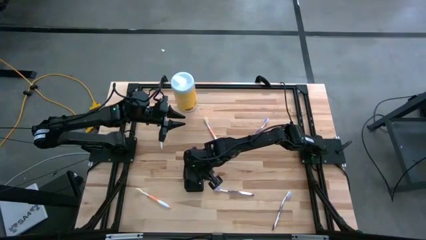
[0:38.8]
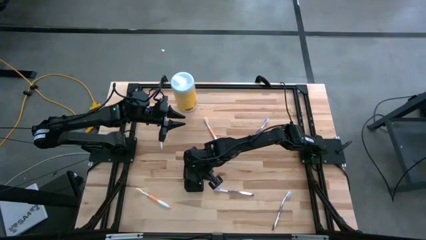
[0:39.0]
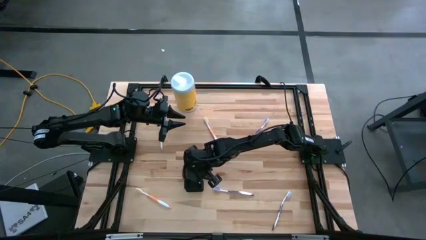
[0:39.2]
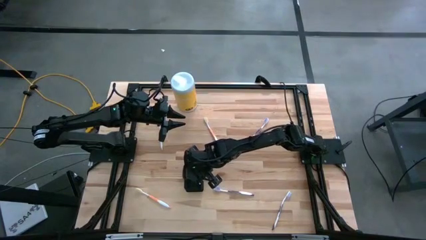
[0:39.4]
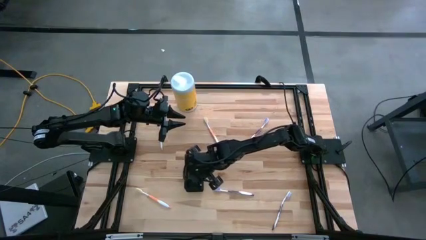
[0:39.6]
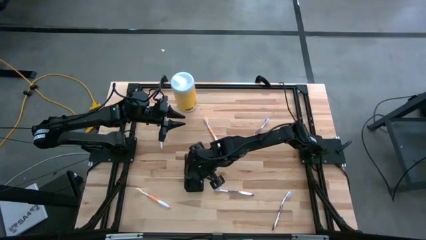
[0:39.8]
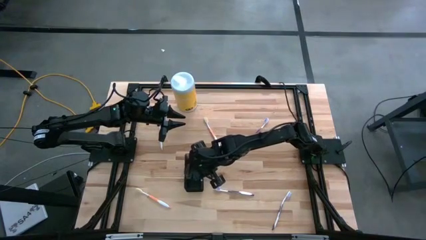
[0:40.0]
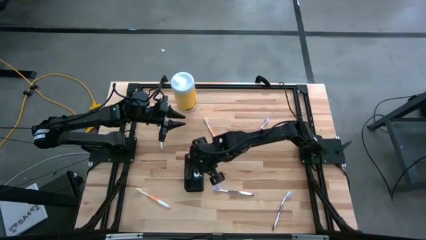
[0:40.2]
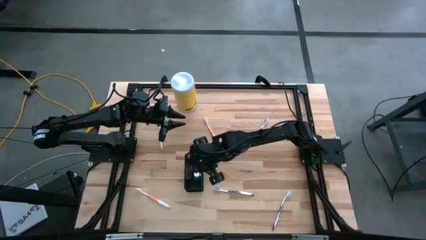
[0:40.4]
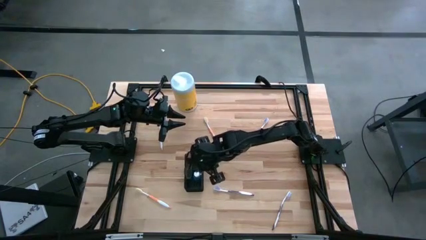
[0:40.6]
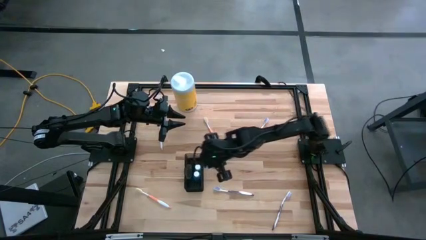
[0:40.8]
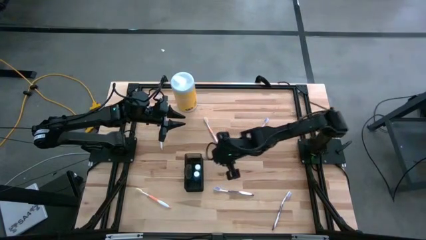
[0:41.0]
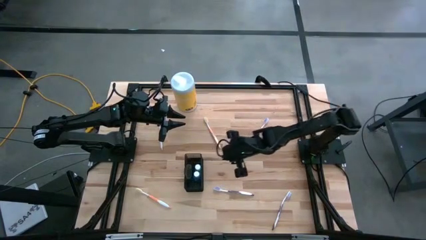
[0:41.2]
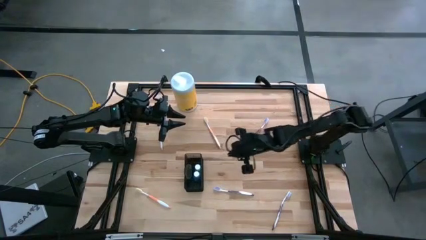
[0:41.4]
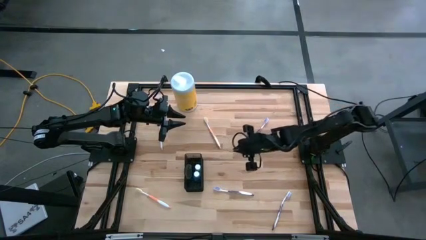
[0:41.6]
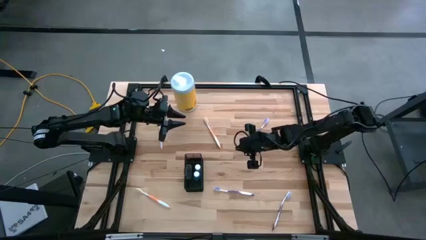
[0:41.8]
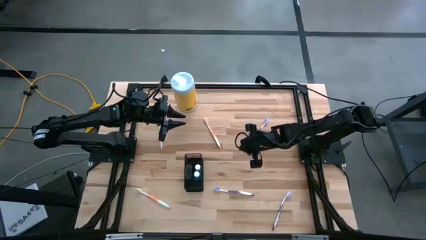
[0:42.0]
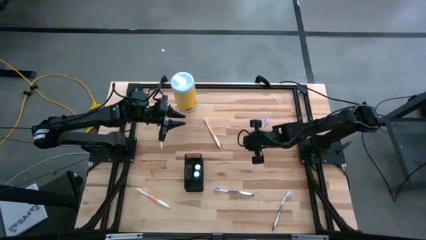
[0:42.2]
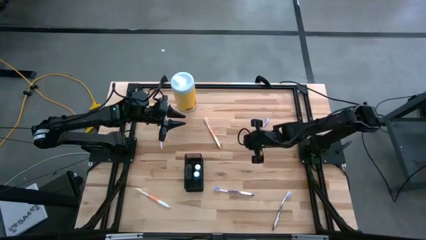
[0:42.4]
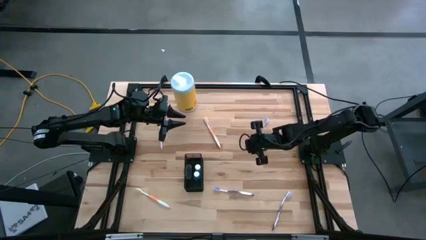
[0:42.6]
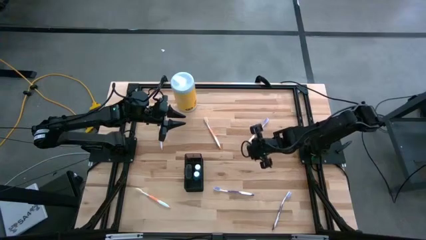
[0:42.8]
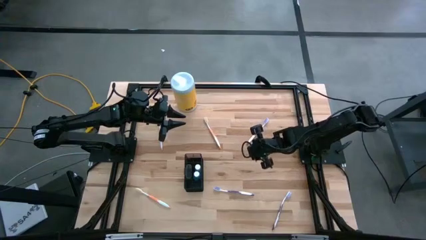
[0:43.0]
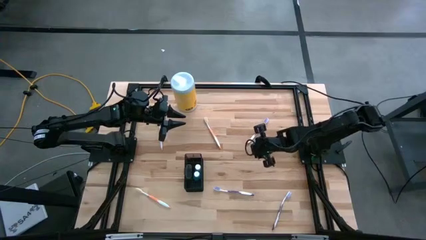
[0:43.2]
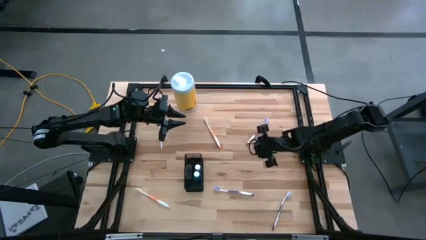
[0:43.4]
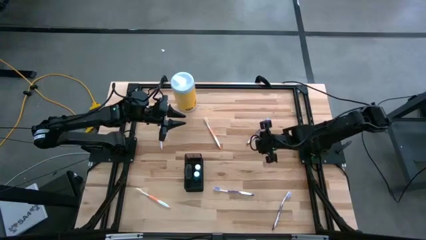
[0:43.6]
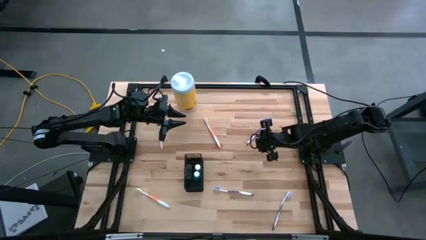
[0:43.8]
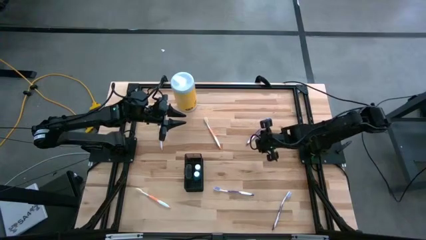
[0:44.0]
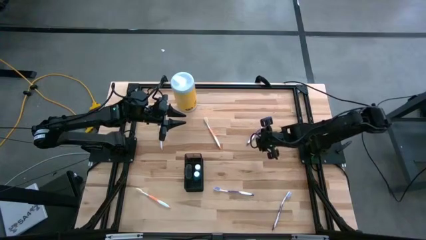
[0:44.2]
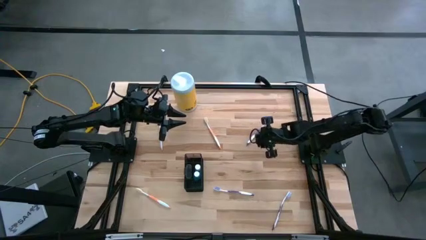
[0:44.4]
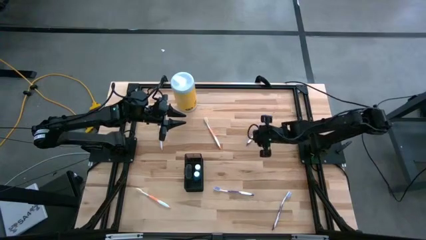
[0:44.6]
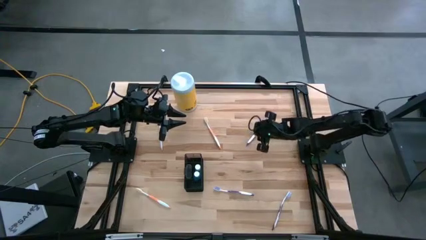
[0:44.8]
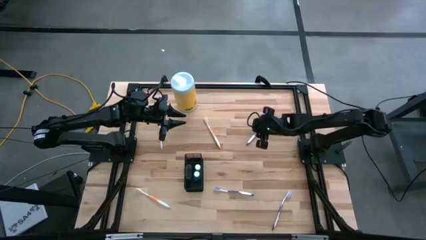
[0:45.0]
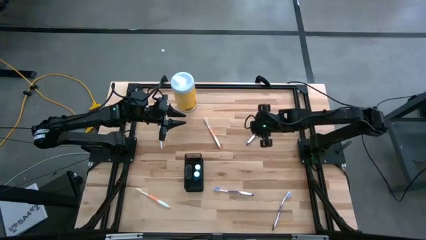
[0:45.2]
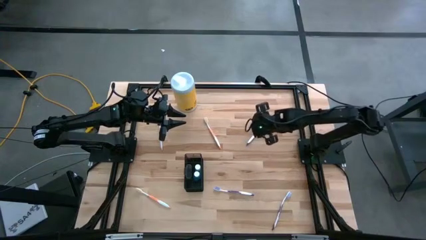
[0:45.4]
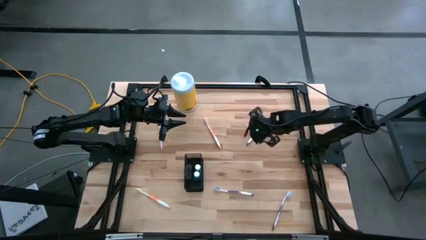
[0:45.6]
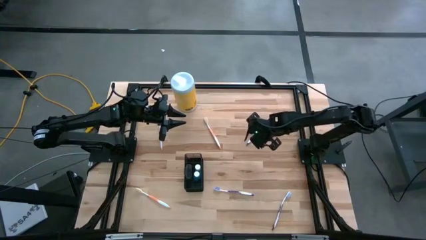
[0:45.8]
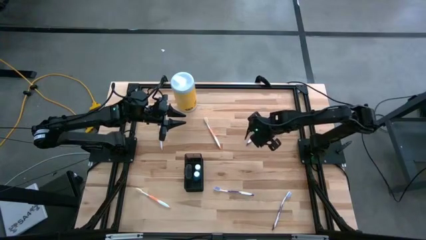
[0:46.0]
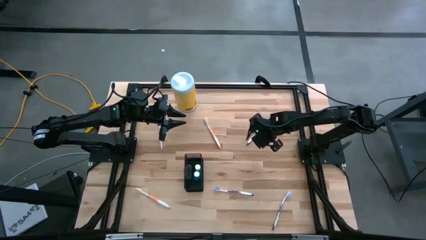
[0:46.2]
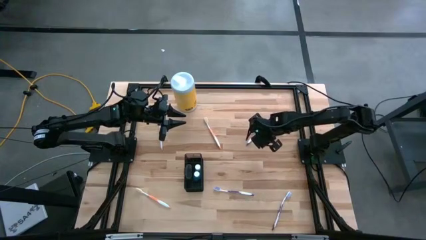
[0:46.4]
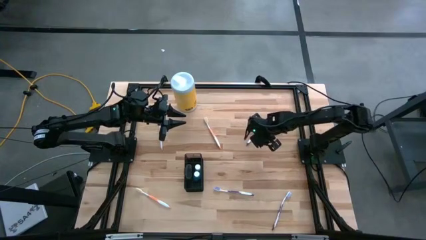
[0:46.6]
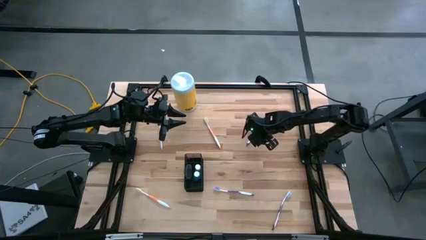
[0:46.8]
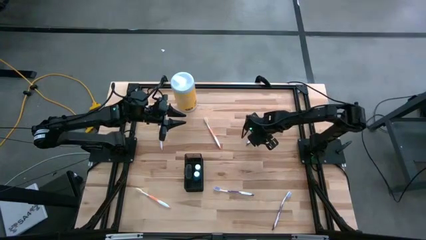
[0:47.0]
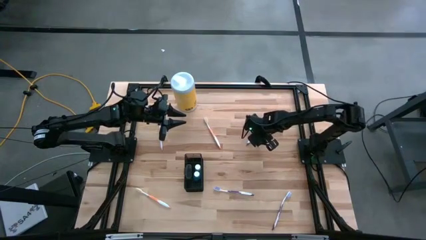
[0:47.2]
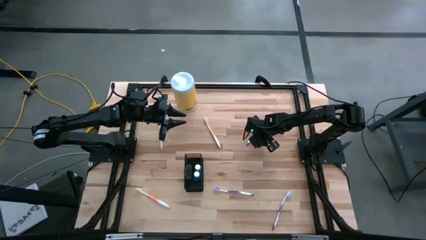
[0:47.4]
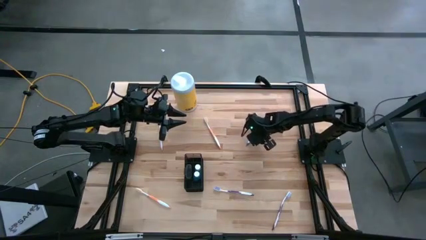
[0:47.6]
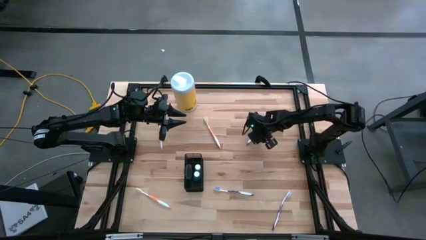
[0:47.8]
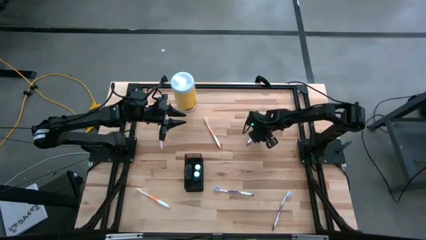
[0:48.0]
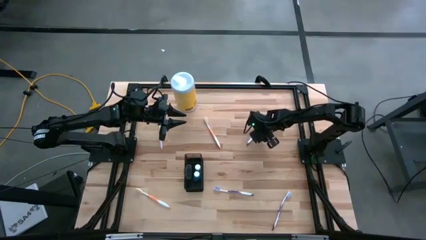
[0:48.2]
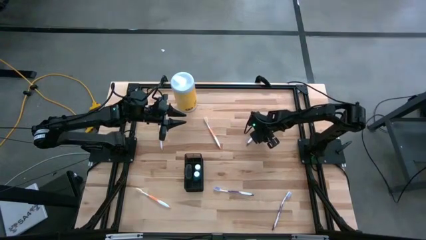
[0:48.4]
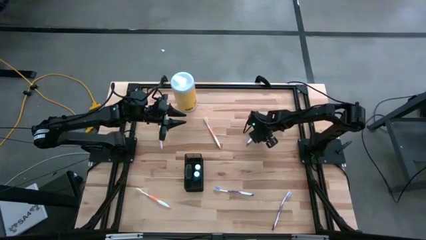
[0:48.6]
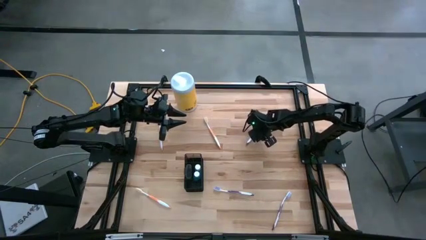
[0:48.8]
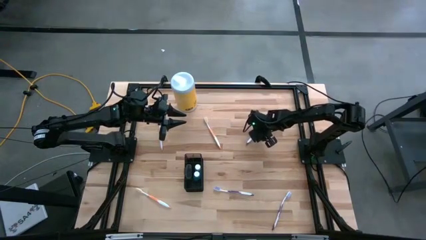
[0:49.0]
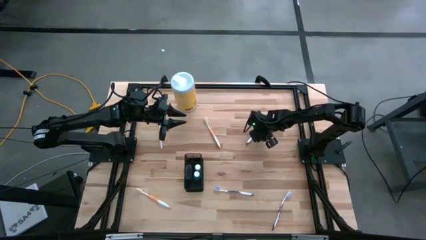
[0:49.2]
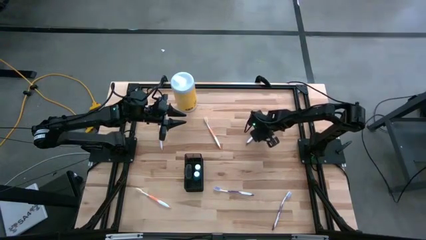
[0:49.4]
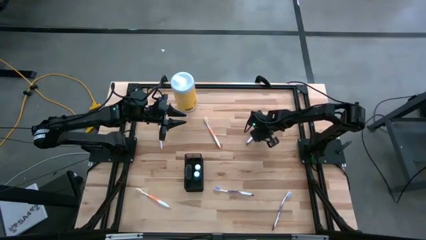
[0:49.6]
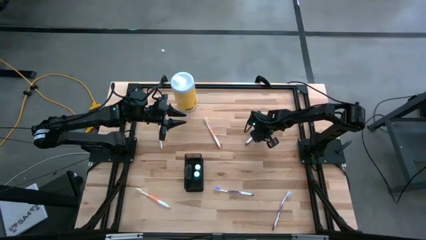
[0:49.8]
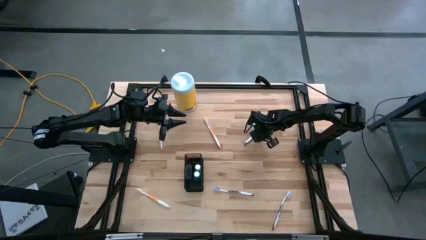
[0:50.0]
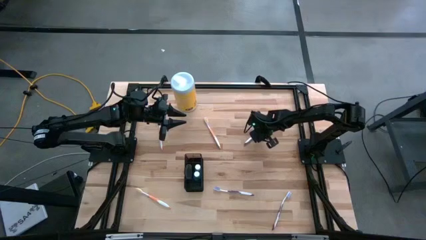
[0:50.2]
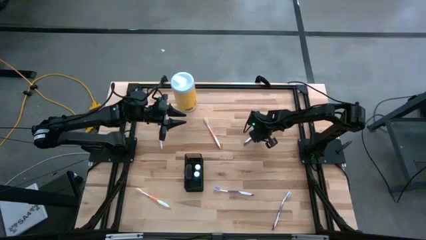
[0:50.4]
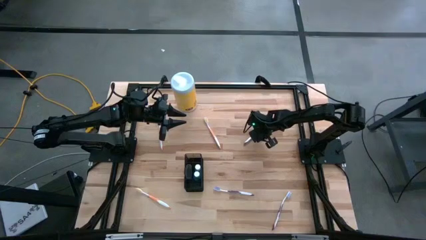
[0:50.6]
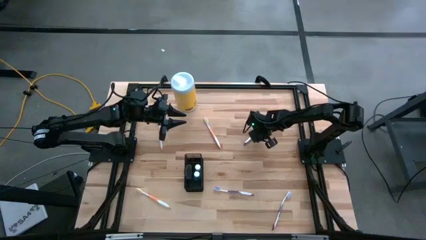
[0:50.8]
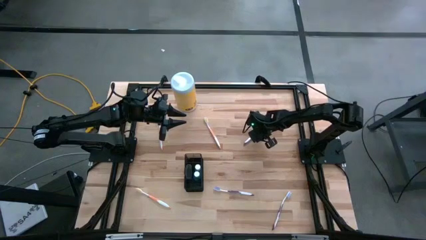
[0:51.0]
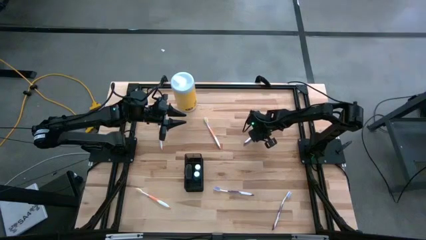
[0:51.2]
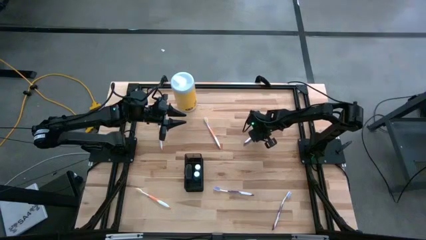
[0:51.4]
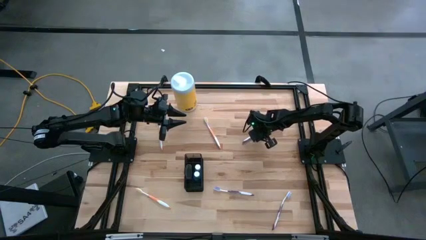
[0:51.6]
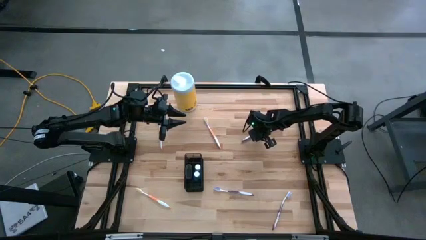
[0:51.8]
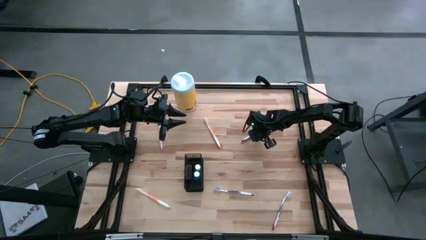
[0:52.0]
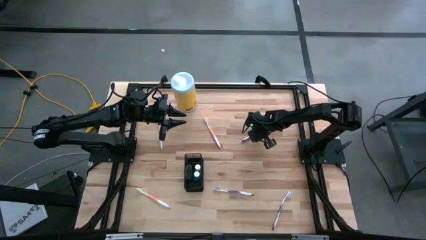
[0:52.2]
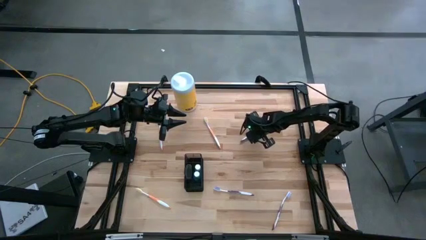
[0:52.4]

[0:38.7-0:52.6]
Task: Pick & Place toothbrushing station
Put the top purple toothbrush into the top section of the black wire organizer
